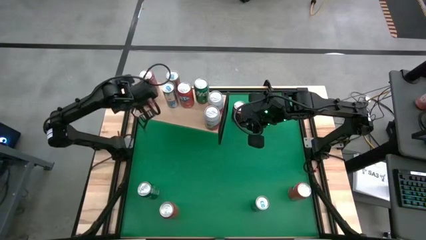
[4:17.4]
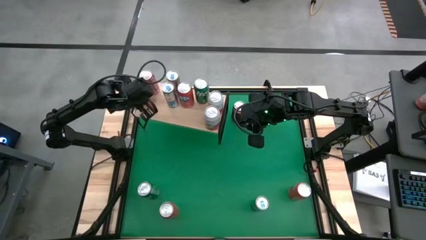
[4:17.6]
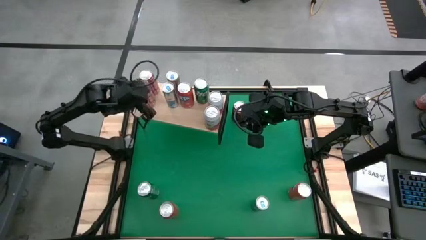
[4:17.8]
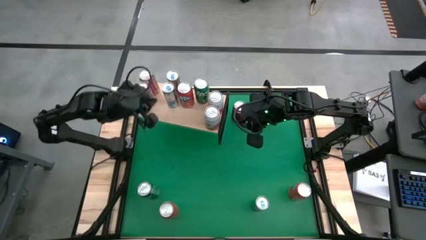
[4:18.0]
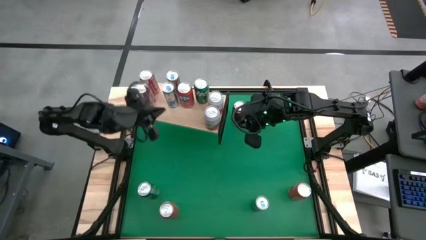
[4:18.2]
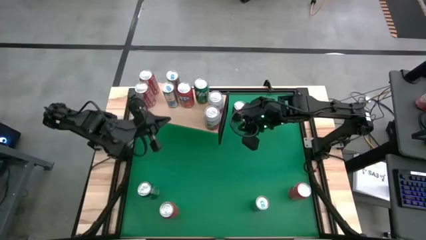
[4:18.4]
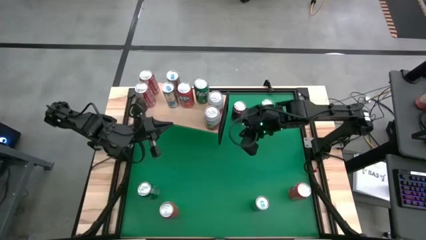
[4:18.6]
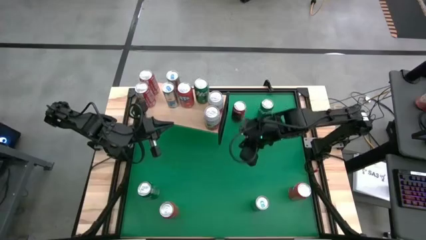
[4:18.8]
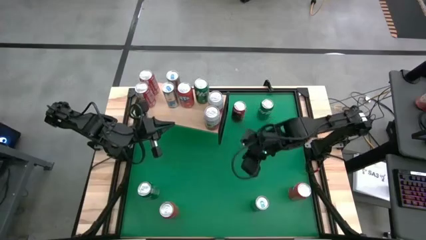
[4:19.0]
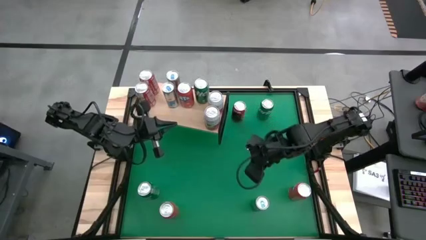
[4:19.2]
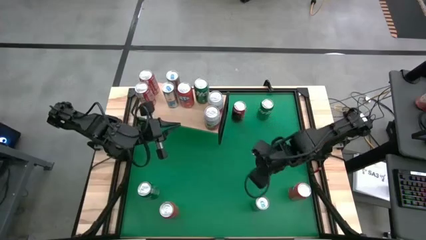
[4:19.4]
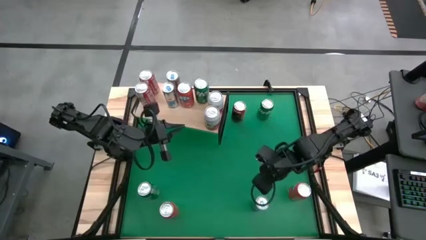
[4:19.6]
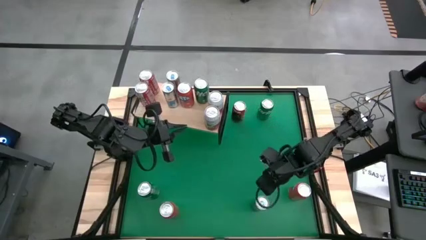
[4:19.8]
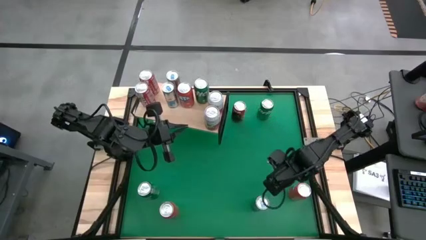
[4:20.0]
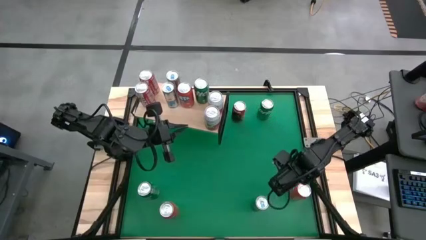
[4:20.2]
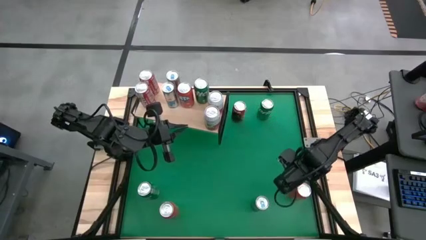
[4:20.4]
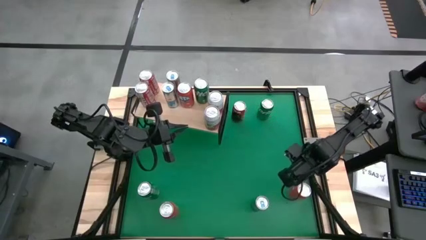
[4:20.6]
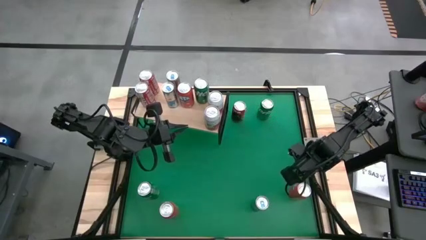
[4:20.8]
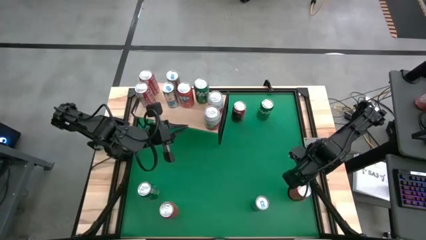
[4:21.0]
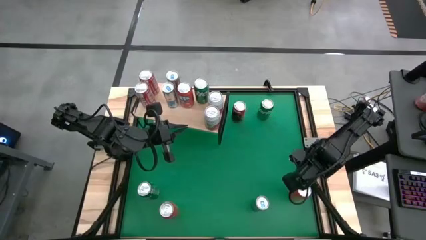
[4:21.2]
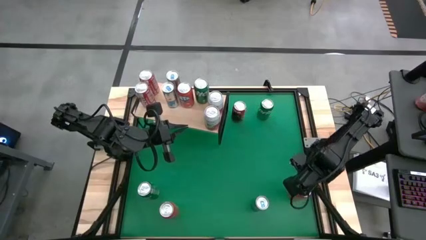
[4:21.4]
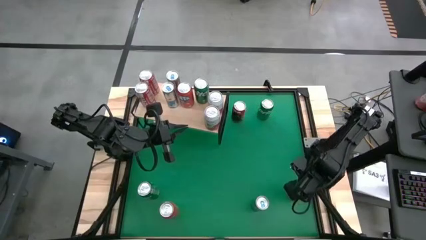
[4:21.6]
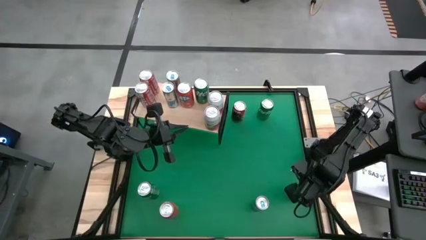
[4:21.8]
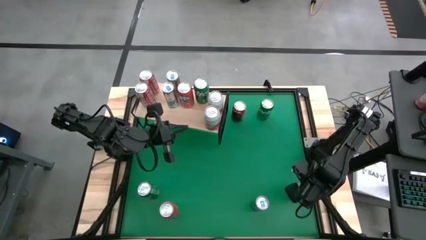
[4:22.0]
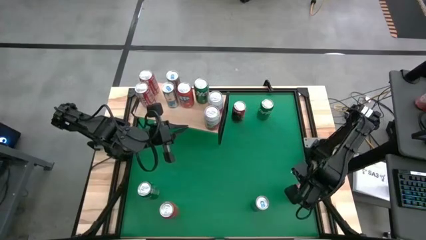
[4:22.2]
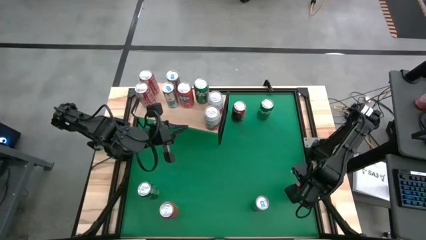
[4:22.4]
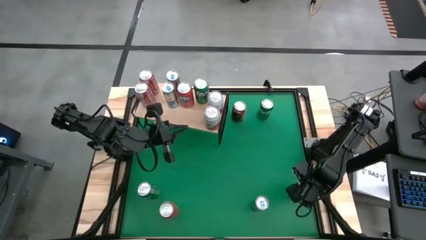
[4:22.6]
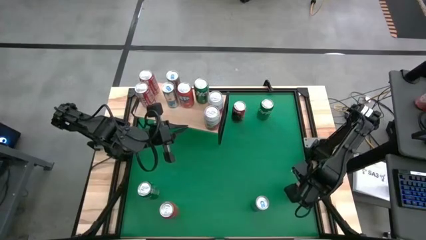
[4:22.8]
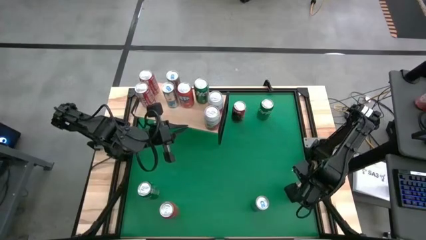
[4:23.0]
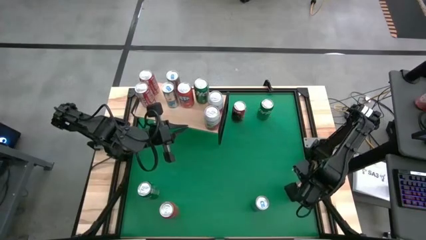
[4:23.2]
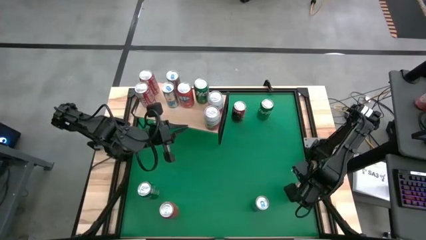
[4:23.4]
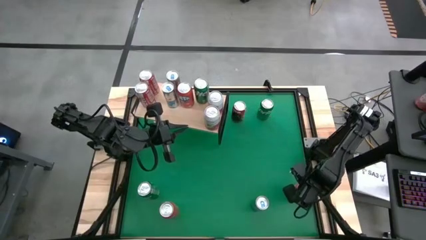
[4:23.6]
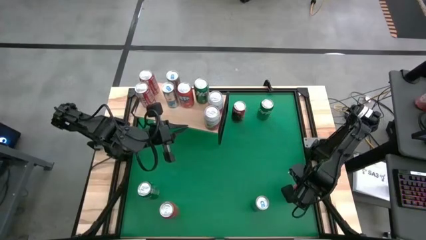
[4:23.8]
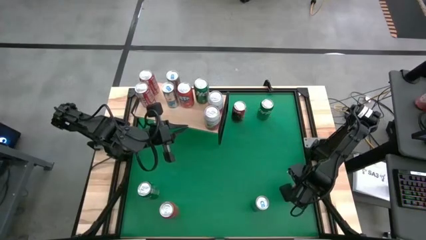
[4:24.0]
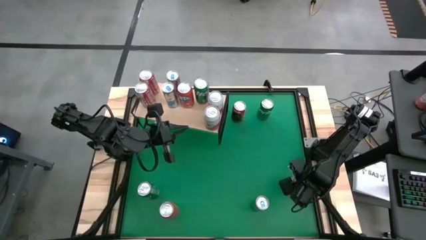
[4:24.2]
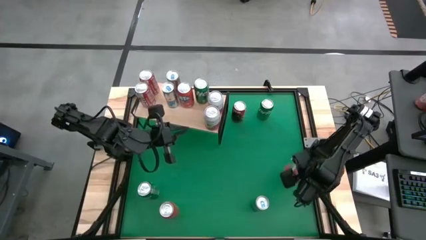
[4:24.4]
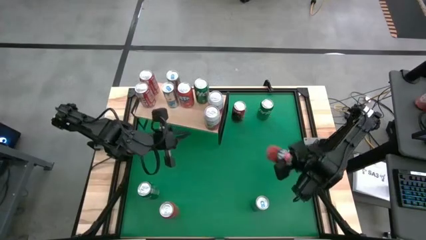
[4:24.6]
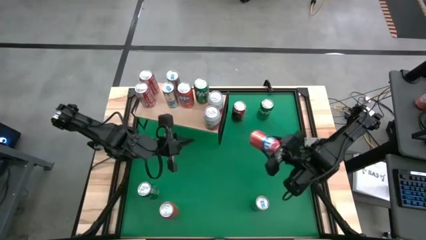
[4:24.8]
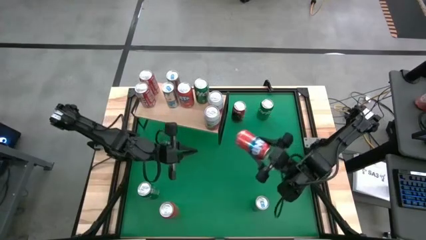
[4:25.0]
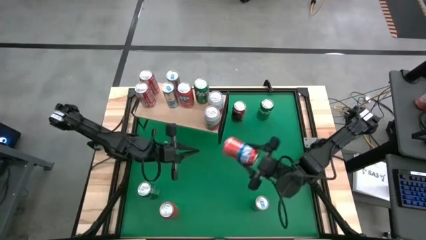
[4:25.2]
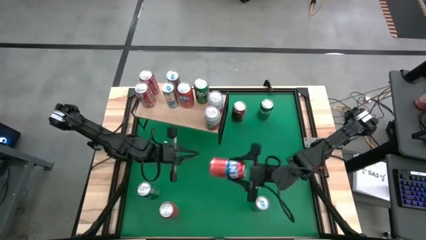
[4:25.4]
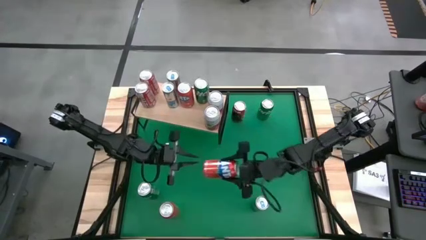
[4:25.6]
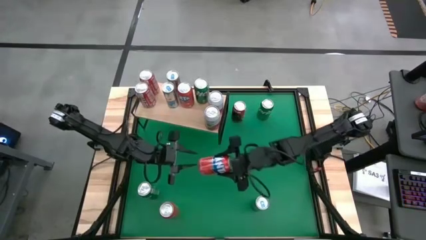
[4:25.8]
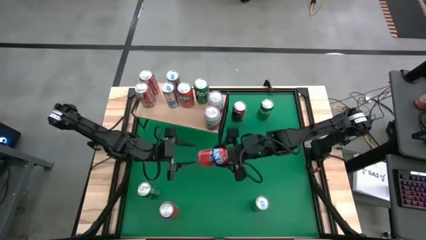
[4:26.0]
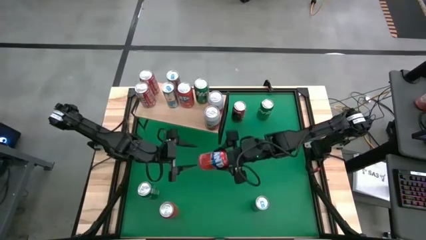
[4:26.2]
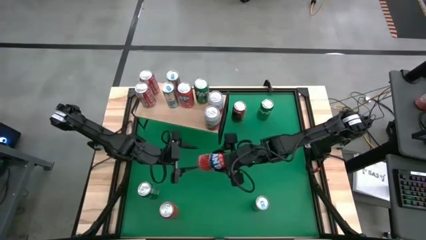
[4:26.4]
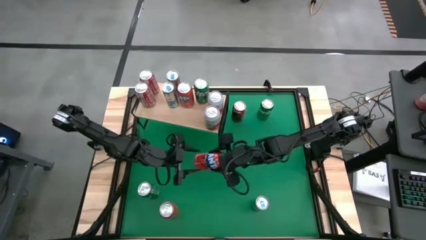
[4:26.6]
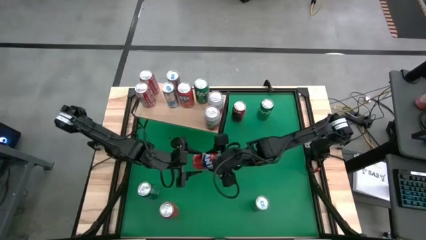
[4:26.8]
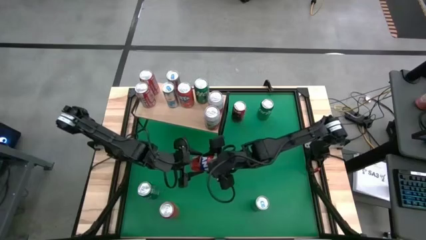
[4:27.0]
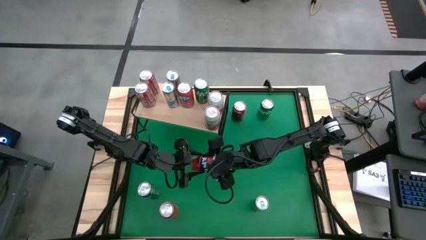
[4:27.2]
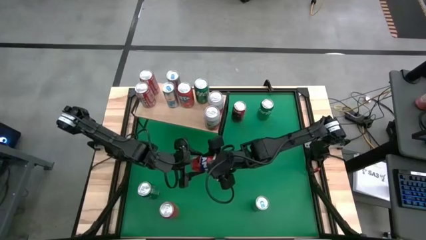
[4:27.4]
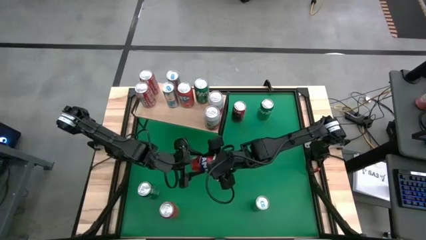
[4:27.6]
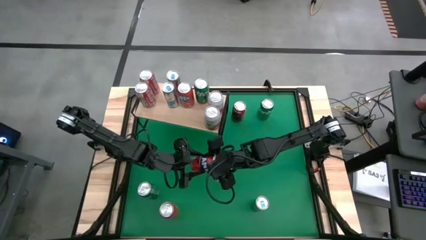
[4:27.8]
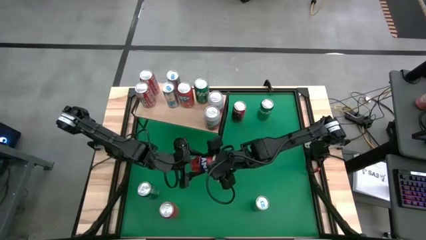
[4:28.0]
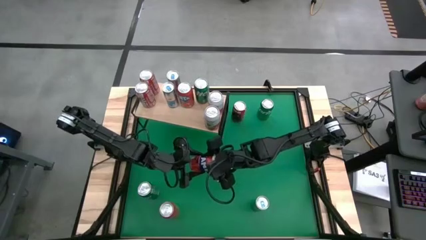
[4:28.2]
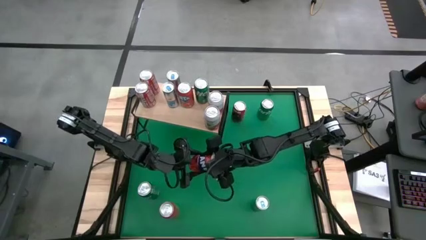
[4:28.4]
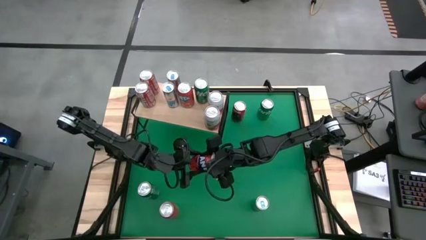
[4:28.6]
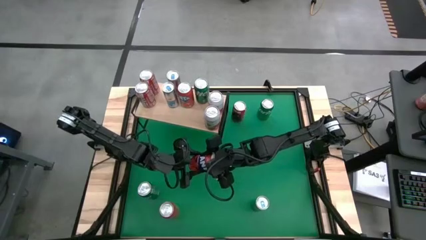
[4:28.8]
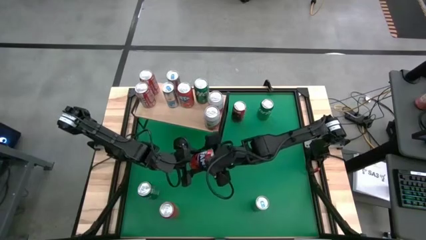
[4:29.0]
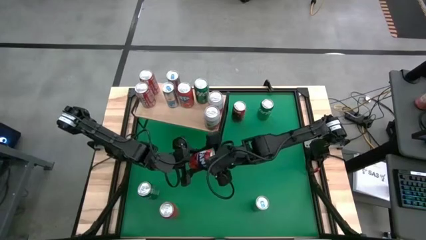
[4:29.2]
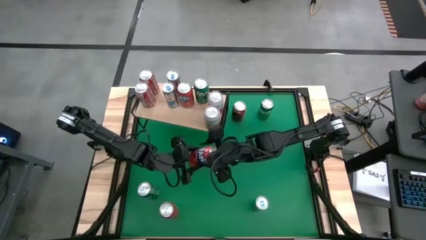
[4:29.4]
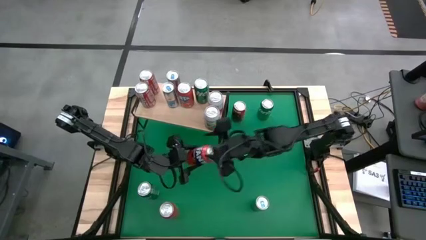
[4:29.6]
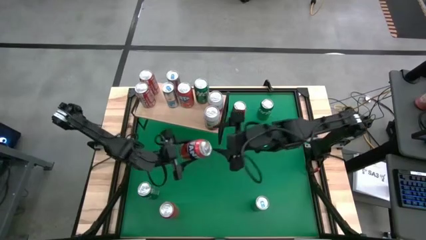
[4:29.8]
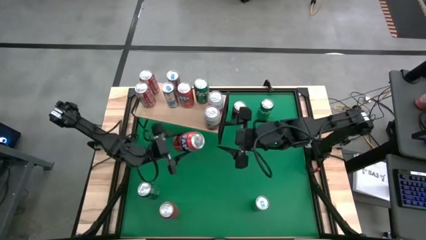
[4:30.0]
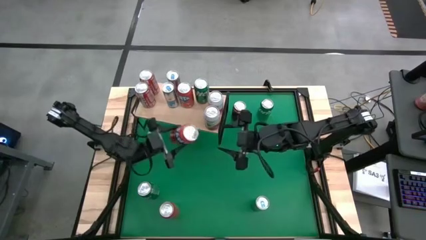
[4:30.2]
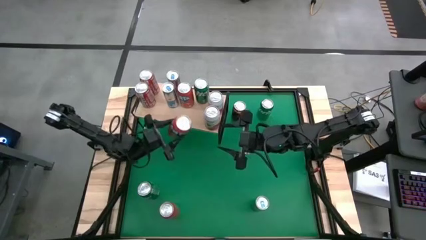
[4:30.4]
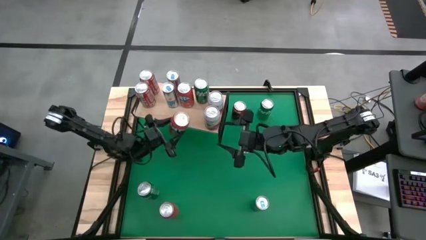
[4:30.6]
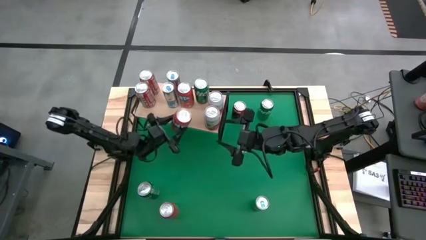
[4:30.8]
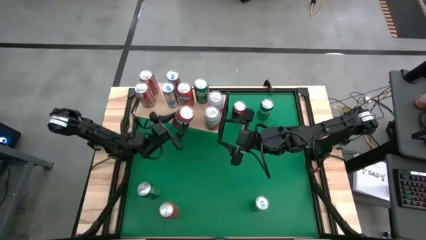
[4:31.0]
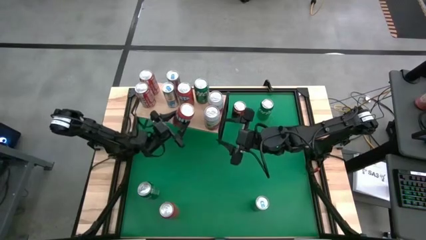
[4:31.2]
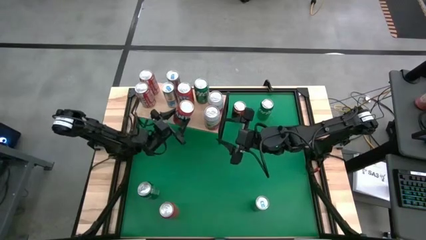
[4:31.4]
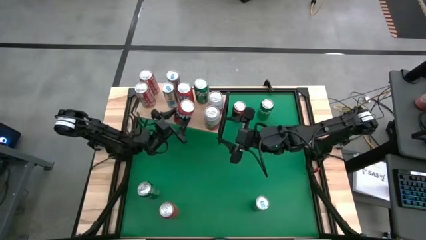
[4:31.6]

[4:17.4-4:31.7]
Task: Place canned beverage on shelf
Put the red soda can on the shelf aligned with the other red soda can

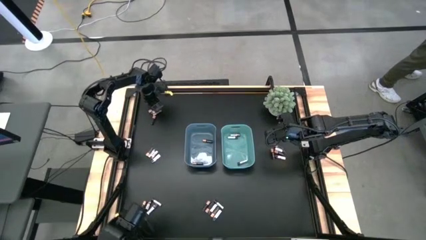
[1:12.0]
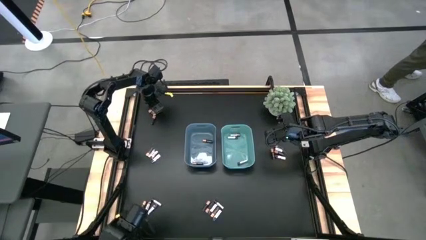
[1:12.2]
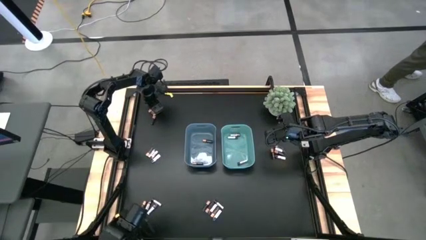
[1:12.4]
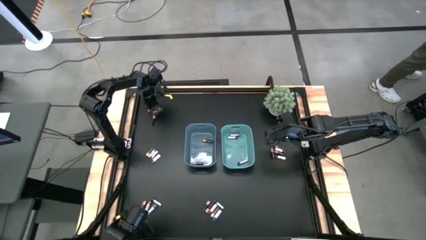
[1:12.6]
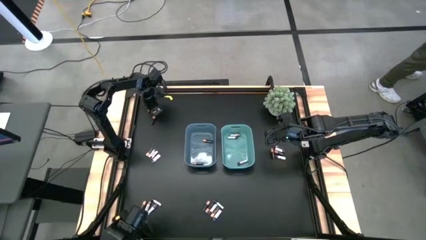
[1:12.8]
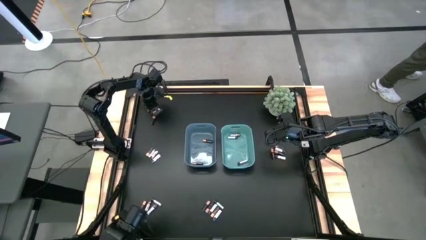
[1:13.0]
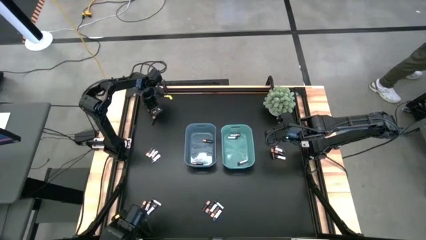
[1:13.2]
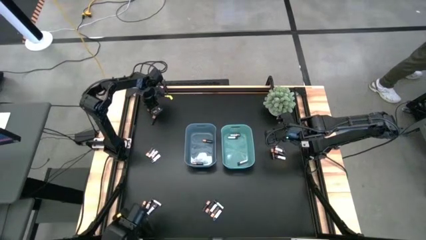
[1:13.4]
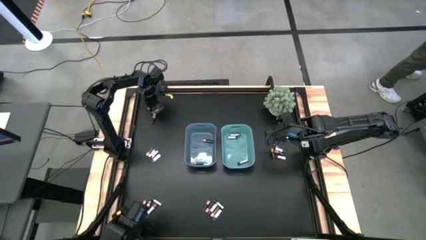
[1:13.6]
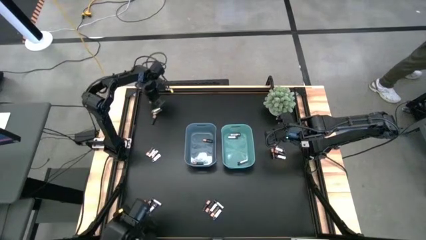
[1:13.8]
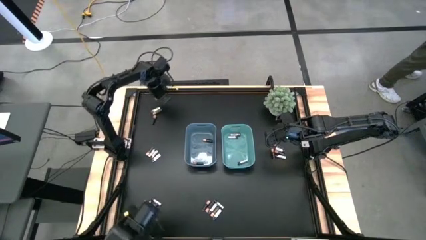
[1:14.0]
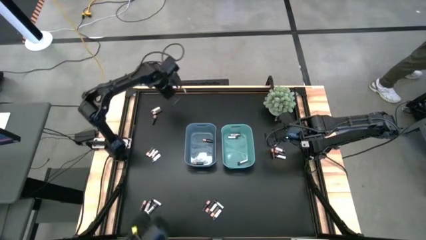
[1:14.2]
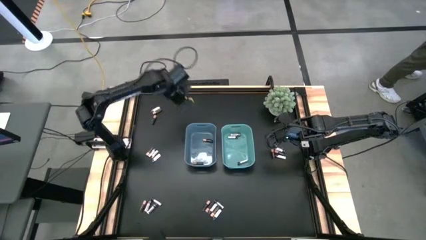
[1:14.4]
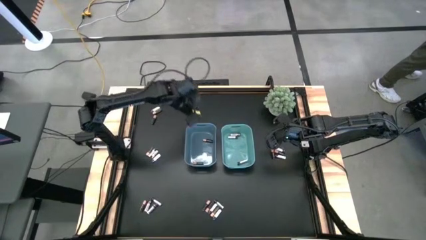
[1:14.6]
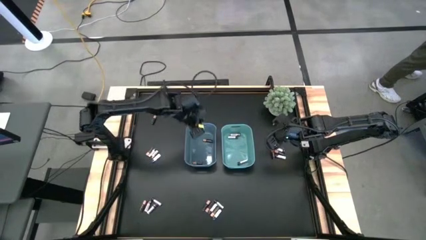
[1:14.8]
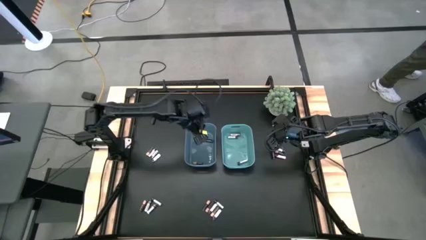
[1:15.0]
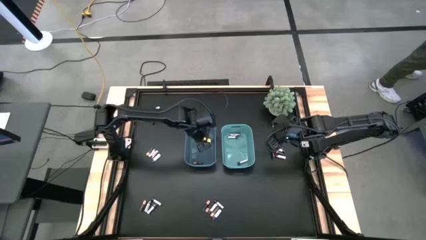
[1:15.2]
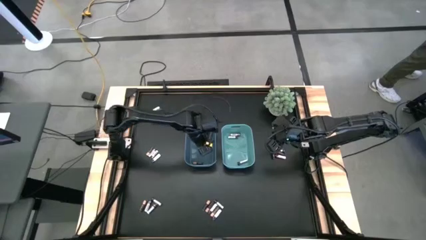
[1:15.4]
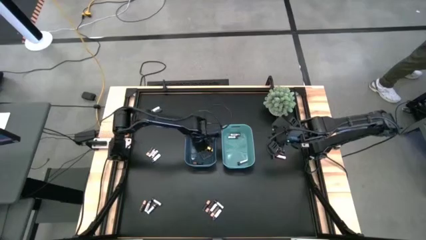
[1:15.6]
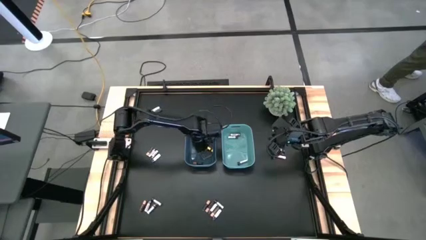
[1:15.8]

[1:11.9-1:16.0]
Task: Sort batteries
Put the black battery into the blue bin
